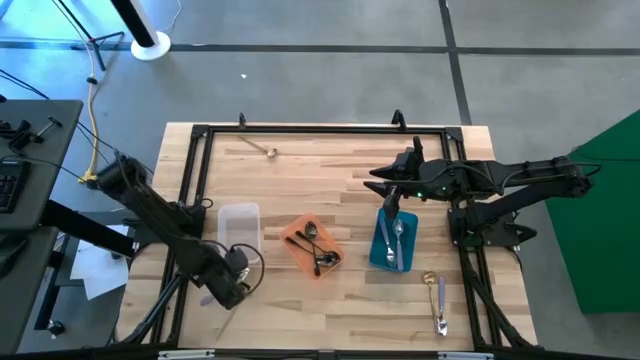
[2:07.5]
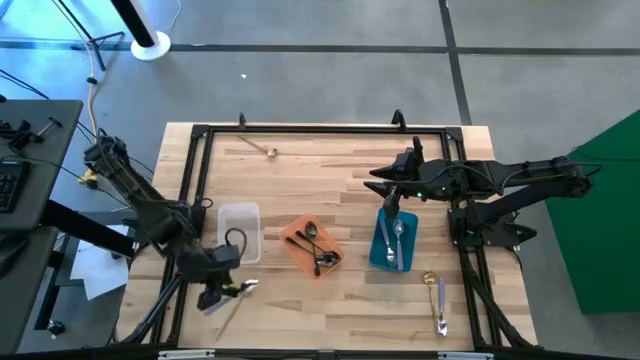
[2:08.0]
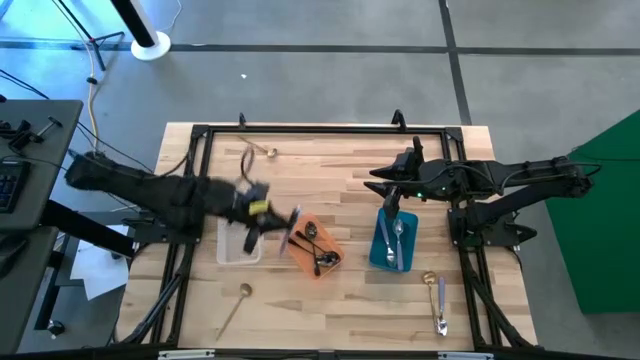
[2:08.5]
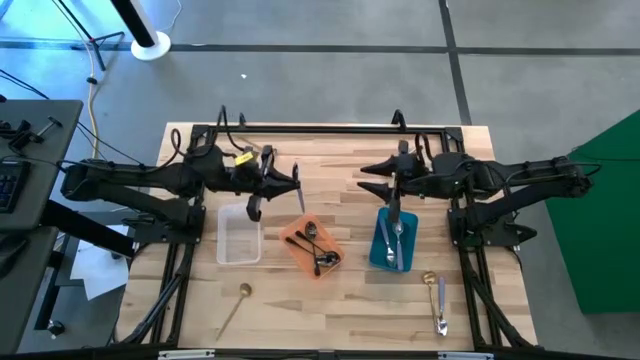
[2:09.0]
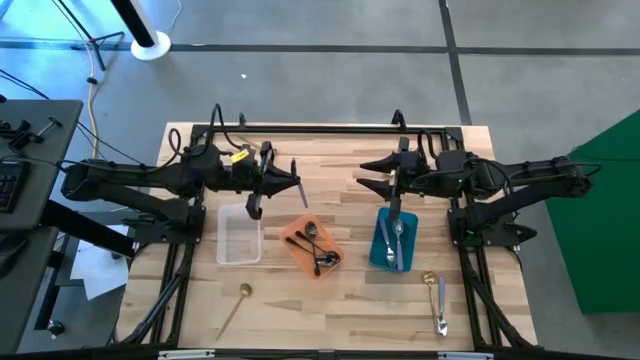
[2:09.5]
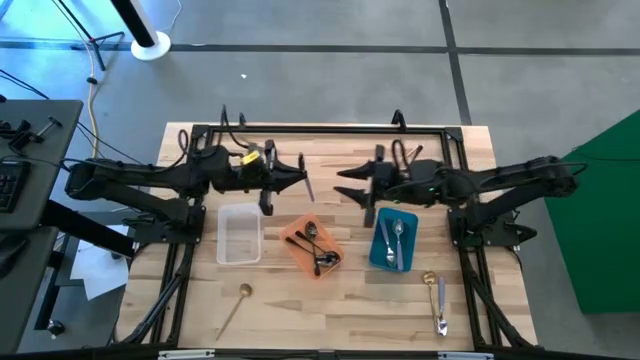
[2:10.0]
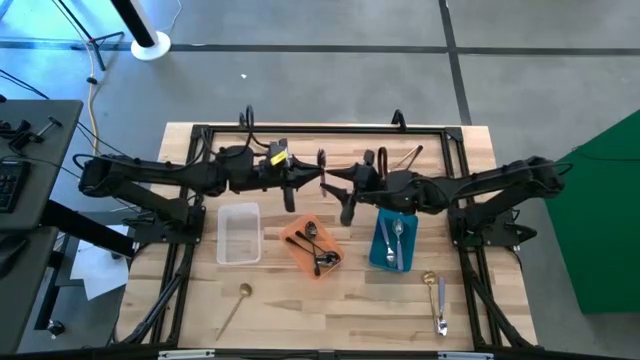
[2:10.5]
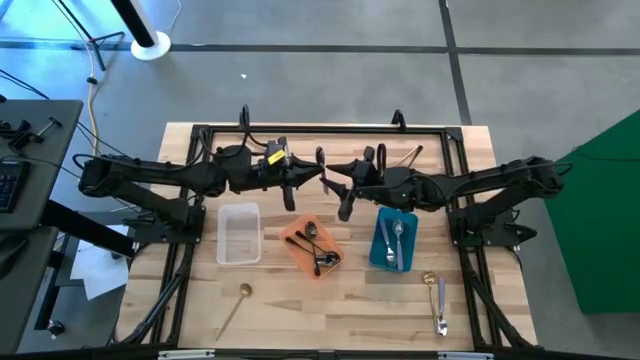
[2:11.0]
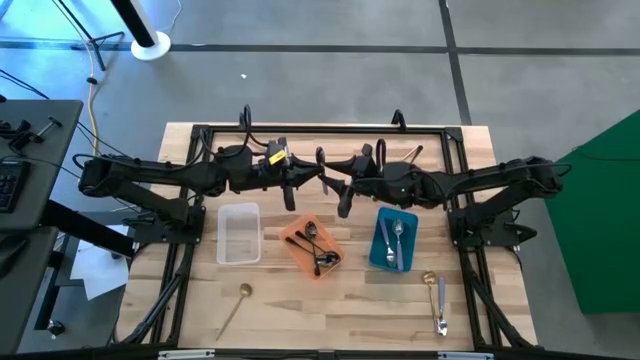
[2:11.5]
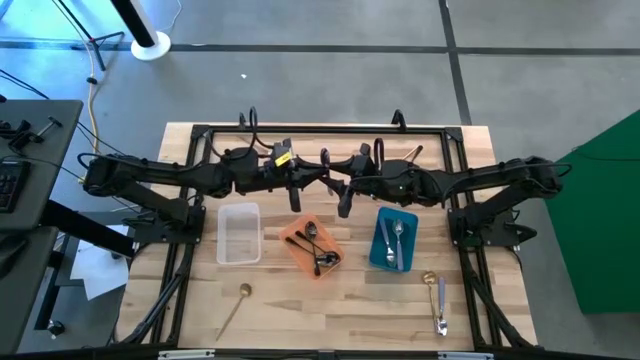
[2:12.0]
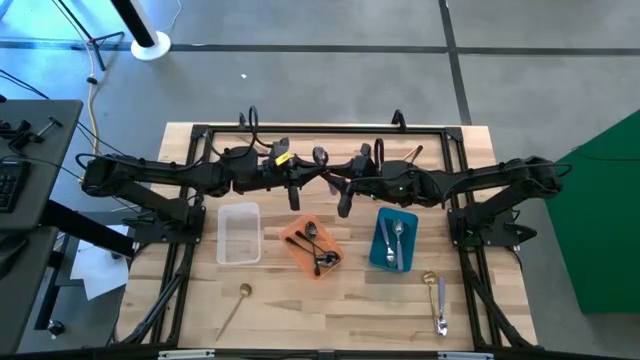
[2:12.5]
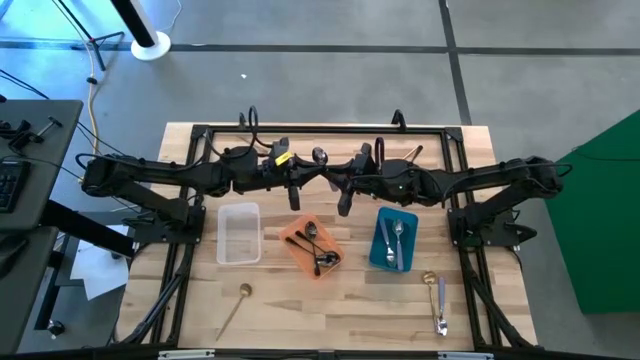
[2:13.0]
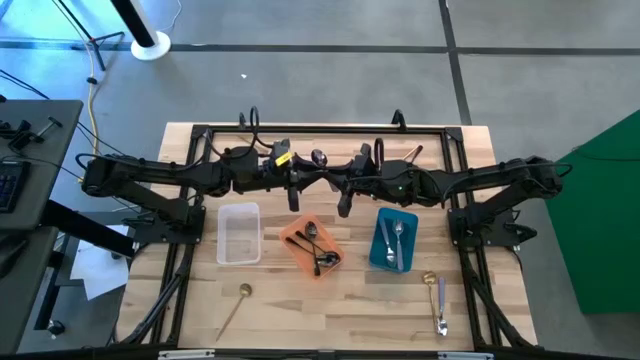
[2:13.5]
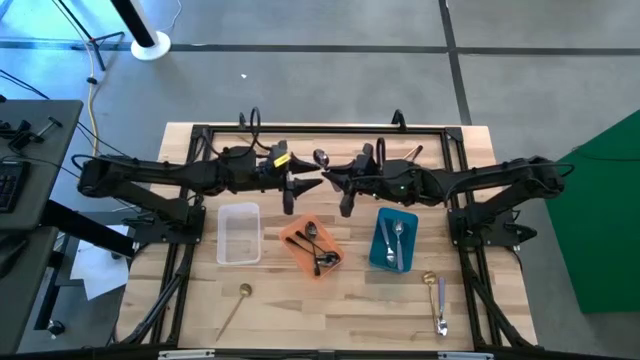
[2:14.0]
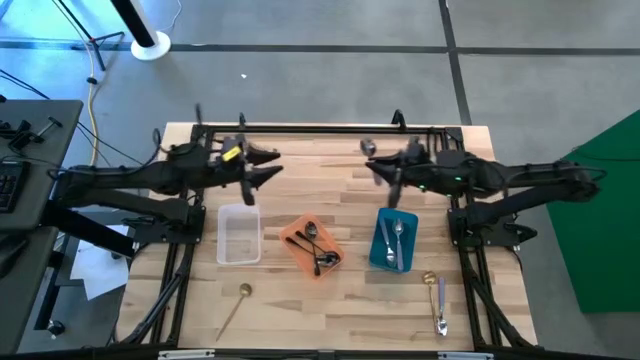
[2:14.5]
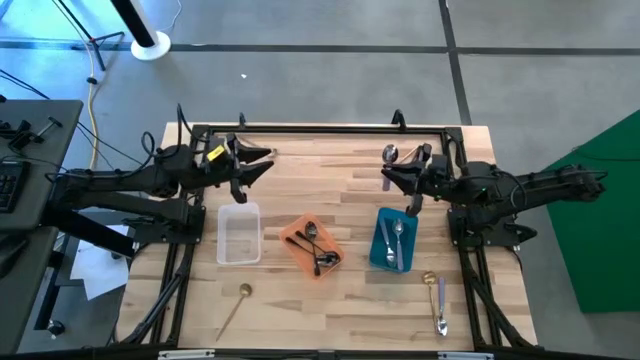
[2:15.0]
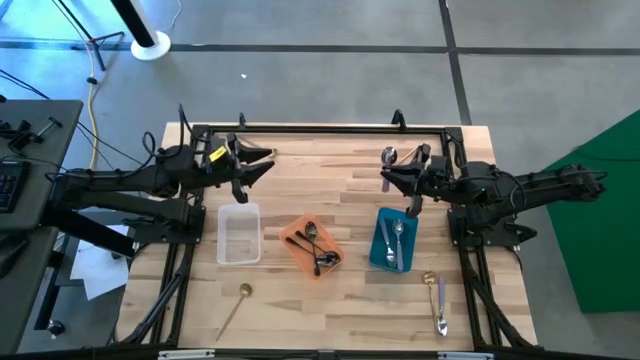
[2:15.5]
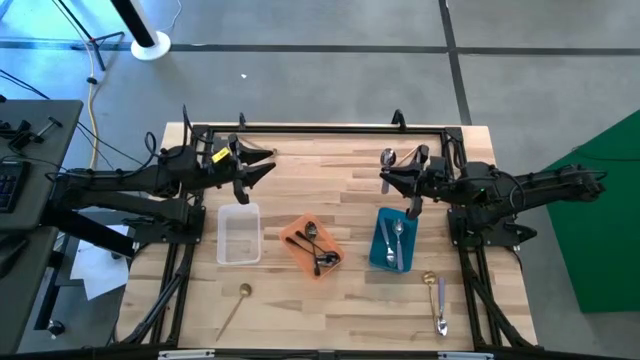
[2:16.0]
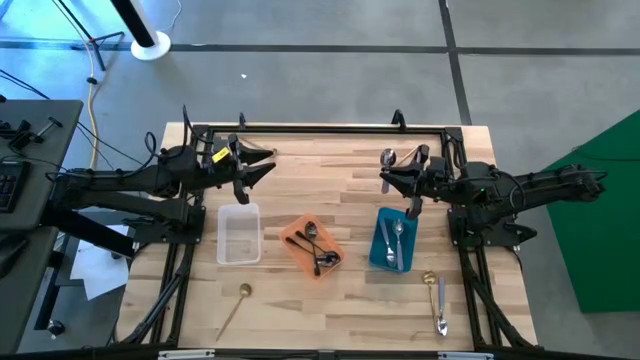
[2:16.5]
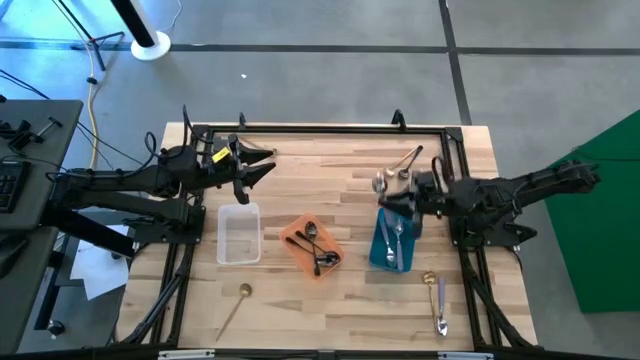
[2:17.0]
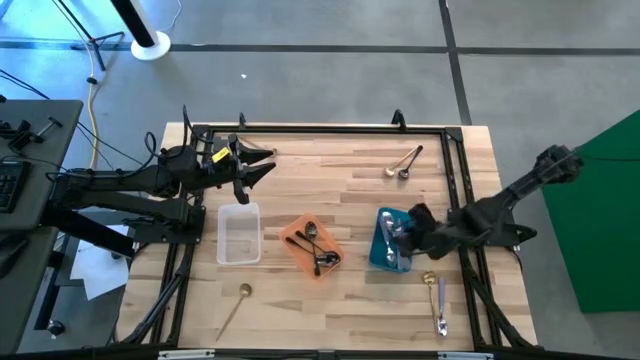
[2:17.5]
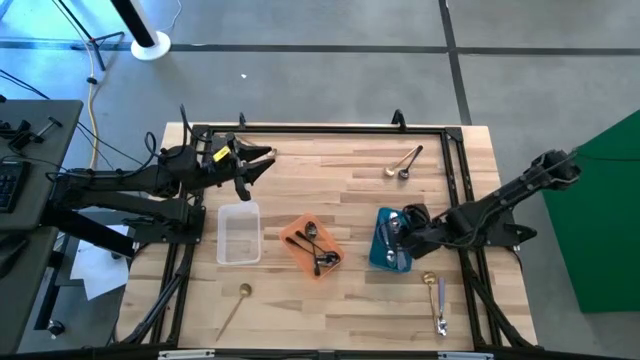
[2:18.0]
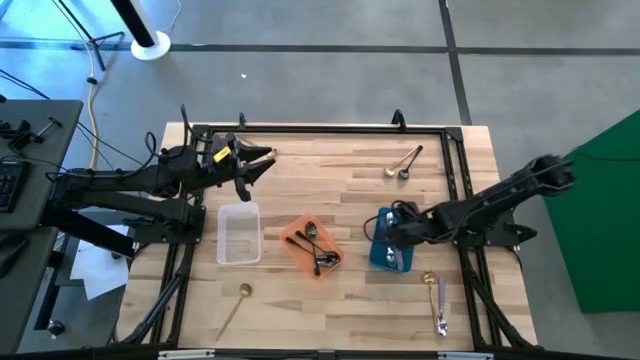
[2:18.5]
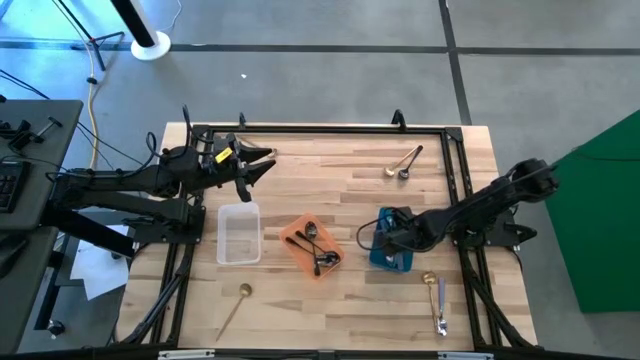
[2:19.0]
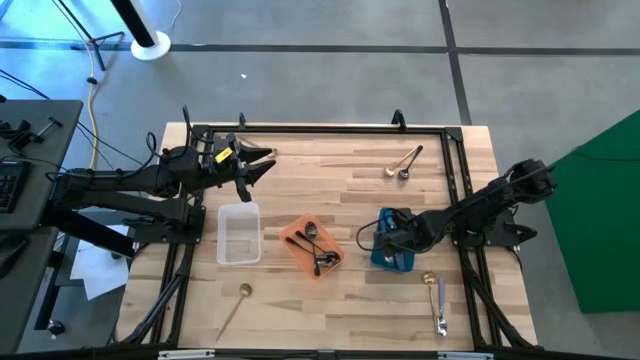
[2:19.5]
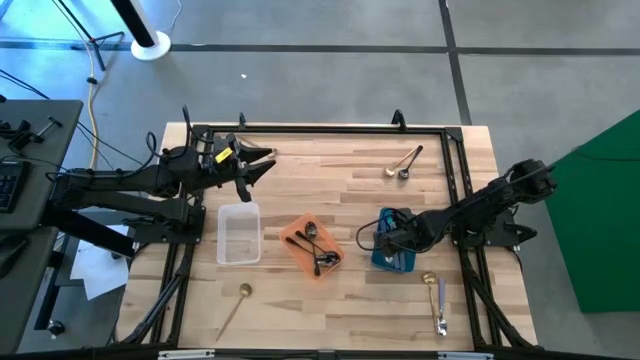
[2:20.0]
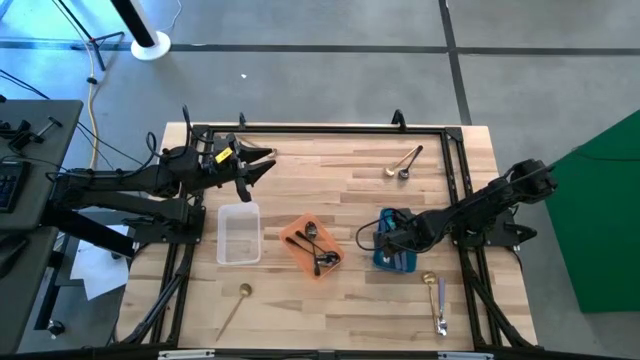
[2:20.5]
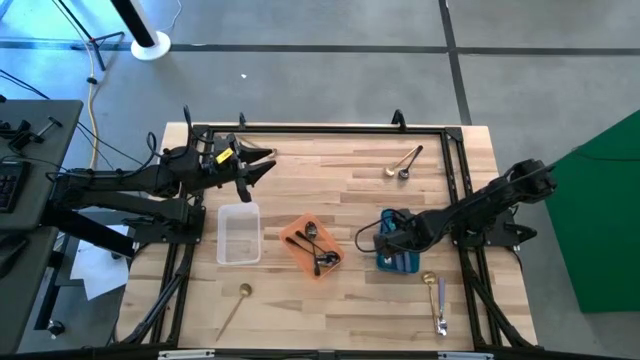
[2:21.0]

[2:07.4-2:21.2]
Task: Sort silverware by color (type)
Put the left purple spoon into the blue bin

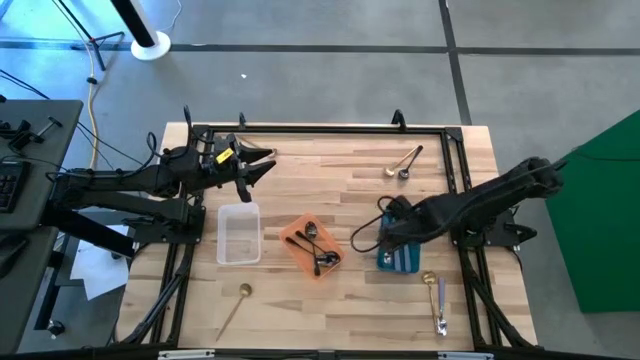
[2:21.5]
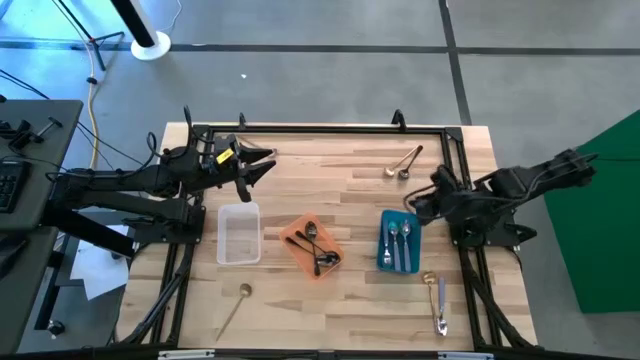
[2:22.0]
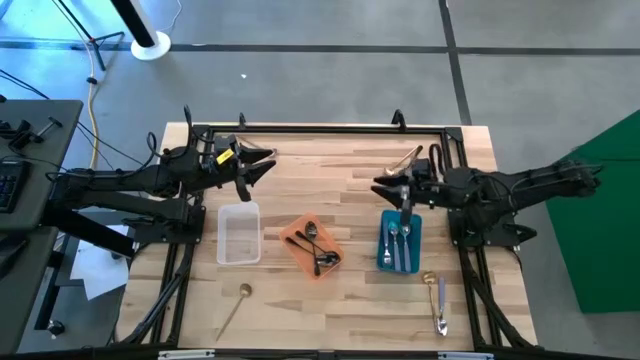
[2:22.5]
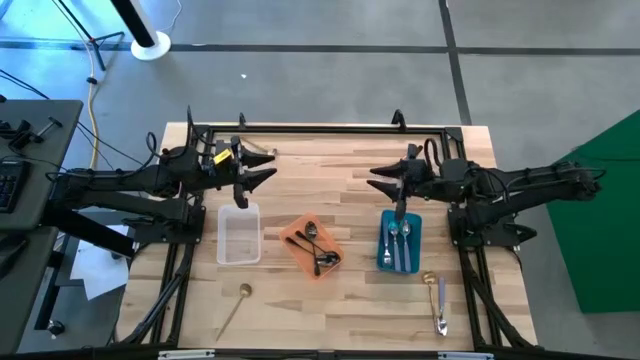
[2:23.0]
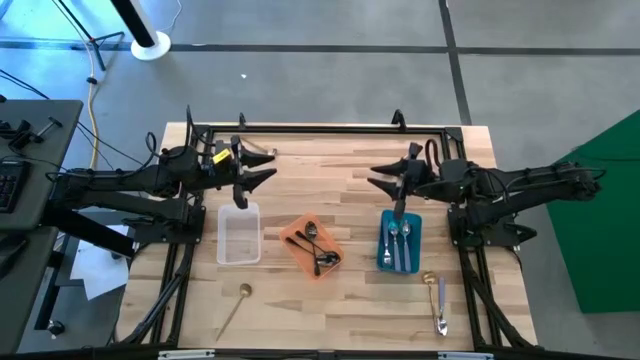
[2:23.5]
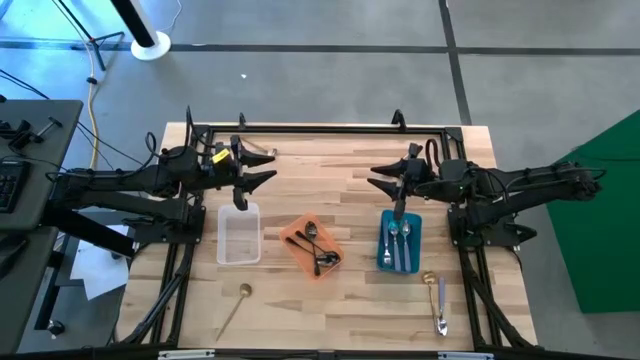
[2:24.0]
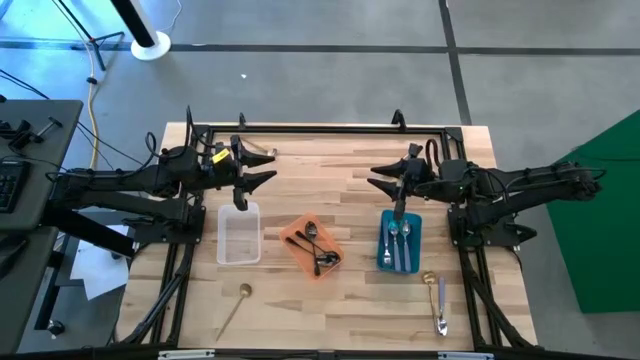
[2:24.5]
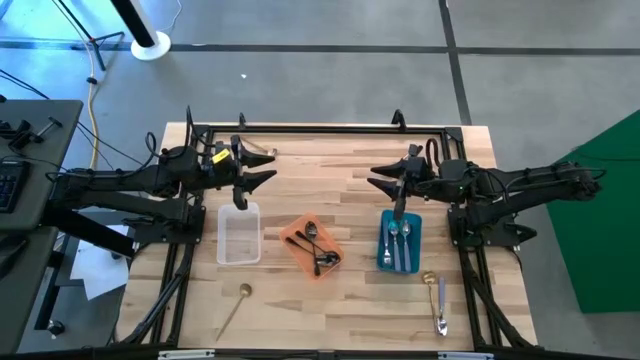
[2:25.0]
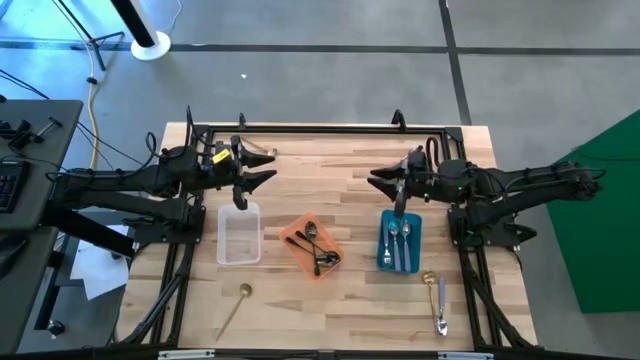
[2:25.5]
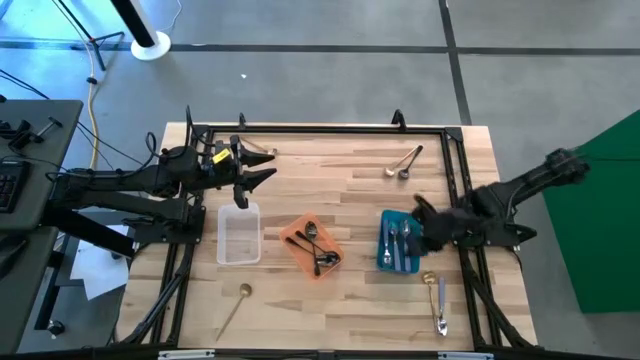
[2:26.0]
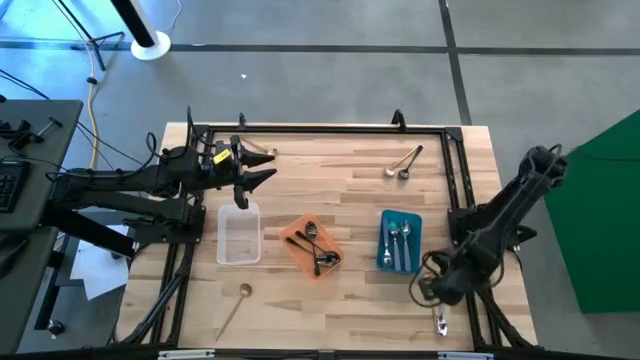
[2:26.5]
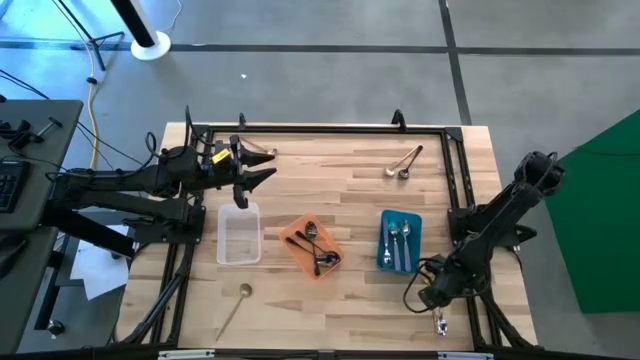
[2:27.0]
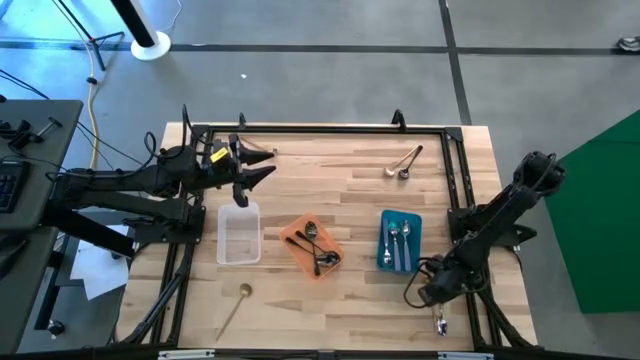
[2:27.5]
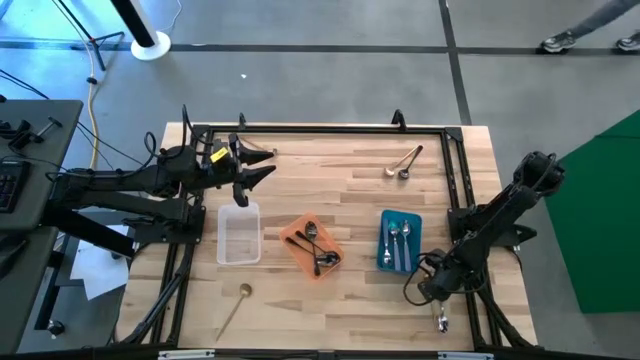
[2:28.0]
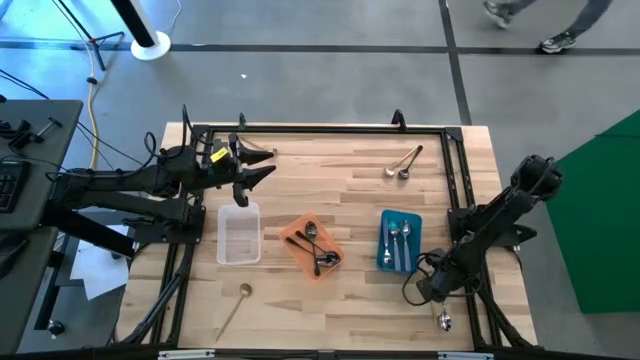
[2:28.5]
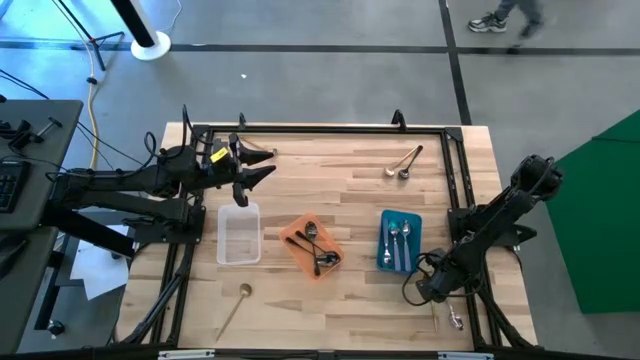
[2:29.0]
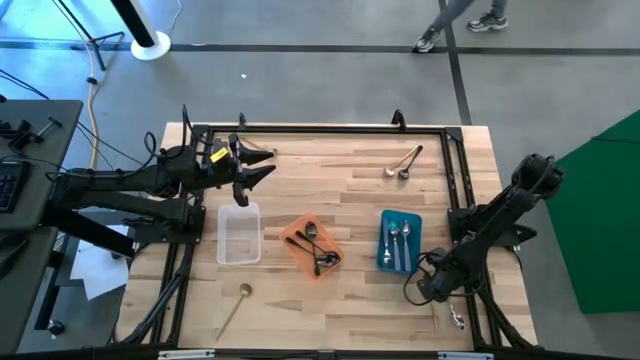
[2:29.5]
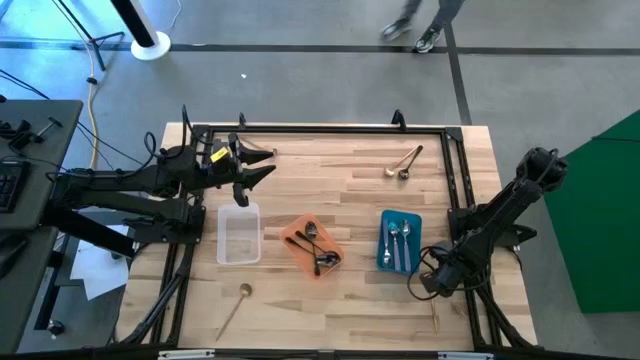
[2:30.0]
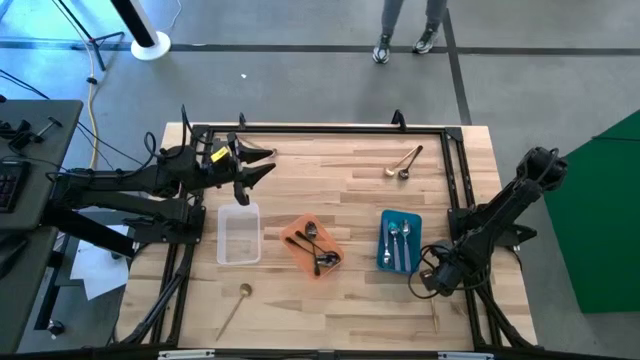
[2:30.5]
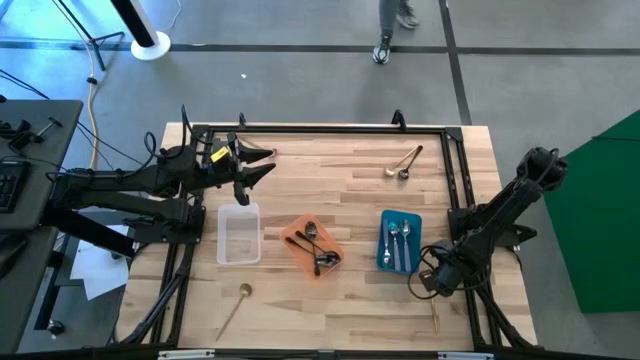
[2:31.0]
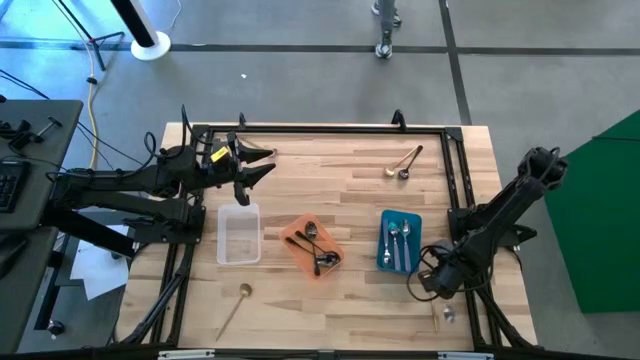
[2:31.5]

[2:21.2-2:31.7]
Put the purple spoon into the blue bin
